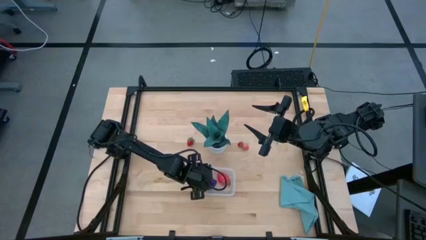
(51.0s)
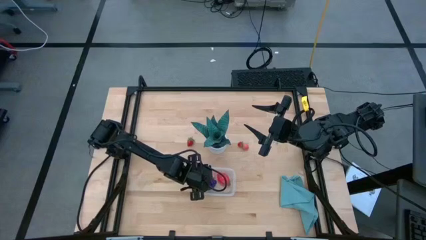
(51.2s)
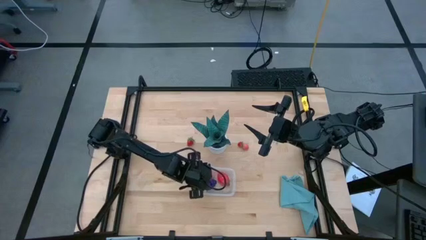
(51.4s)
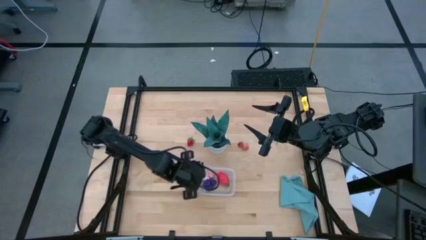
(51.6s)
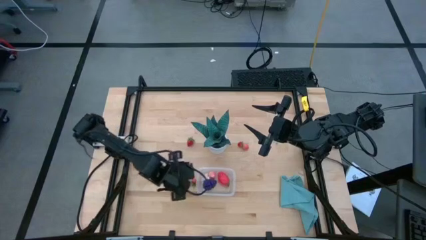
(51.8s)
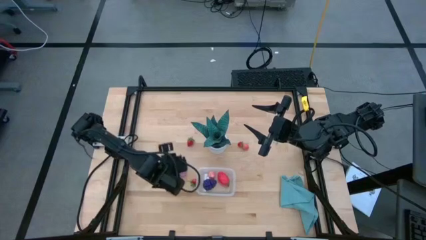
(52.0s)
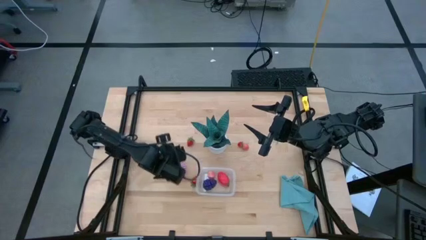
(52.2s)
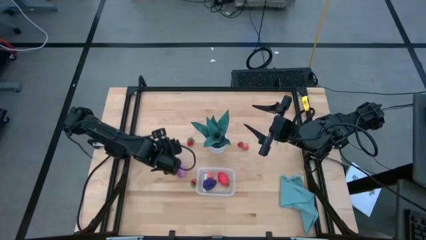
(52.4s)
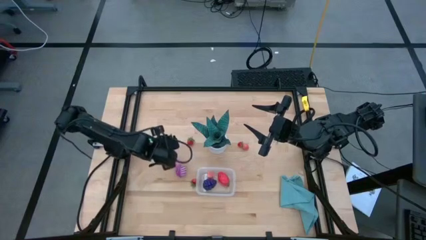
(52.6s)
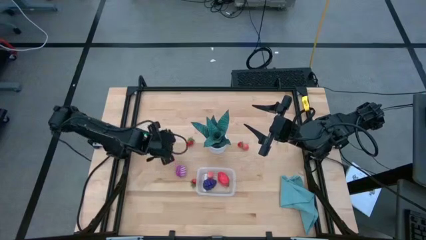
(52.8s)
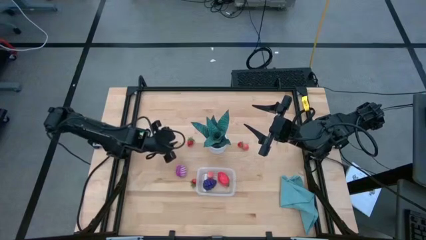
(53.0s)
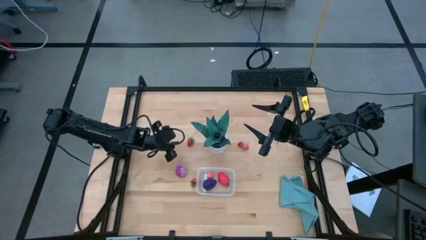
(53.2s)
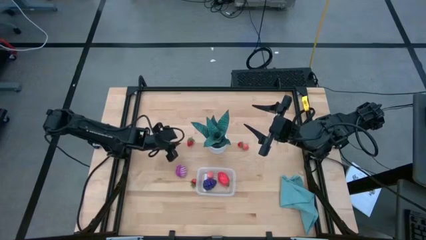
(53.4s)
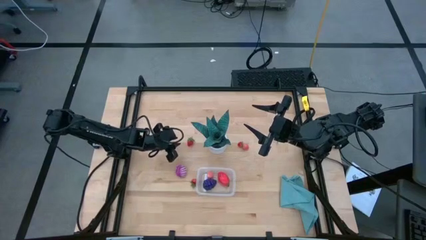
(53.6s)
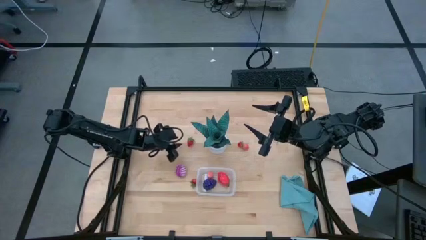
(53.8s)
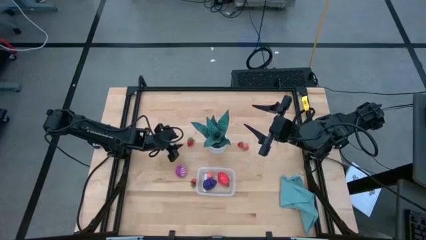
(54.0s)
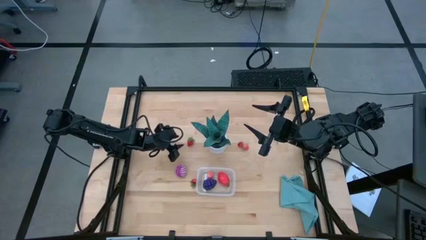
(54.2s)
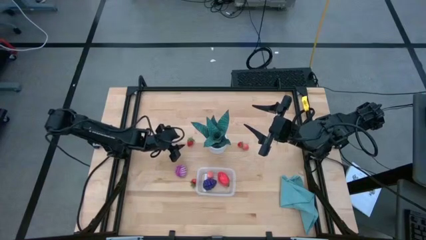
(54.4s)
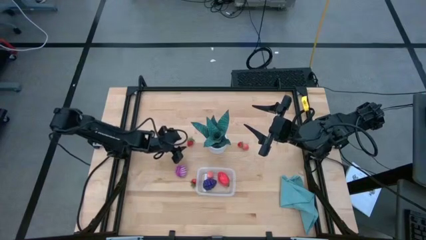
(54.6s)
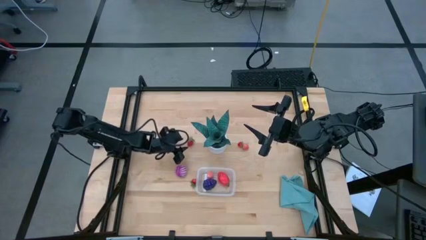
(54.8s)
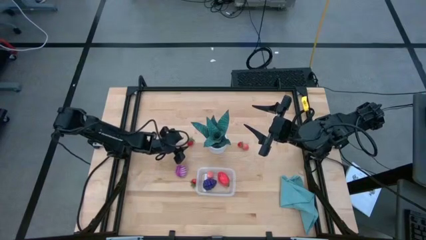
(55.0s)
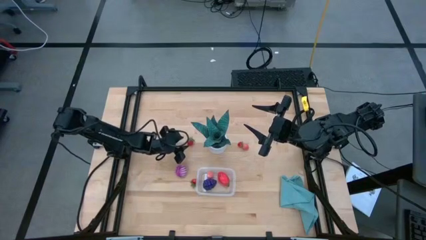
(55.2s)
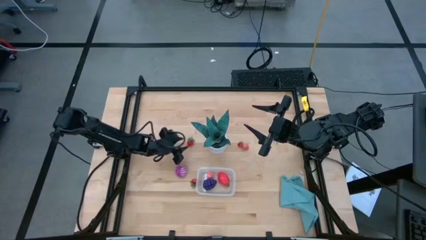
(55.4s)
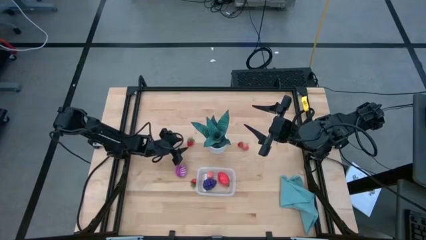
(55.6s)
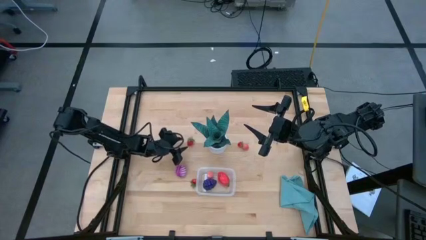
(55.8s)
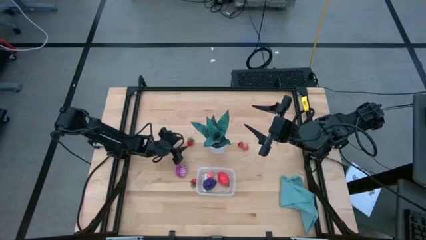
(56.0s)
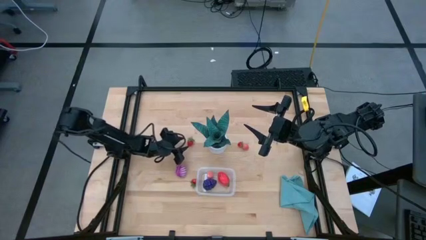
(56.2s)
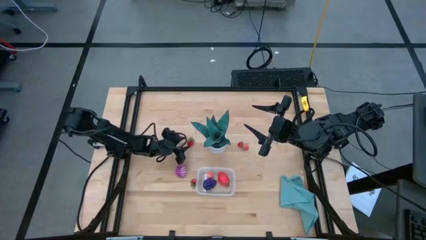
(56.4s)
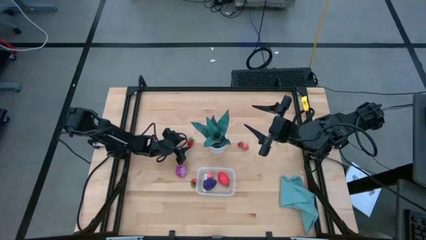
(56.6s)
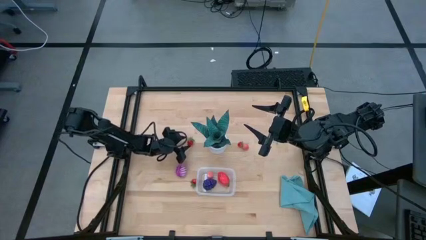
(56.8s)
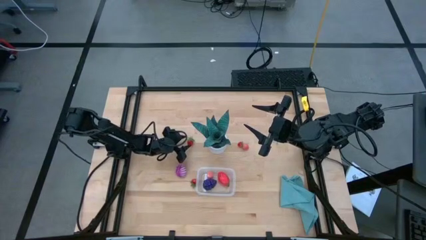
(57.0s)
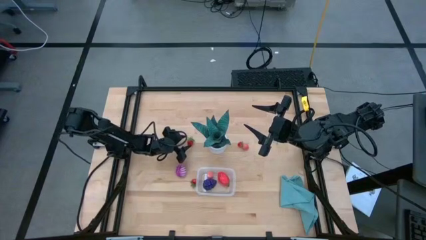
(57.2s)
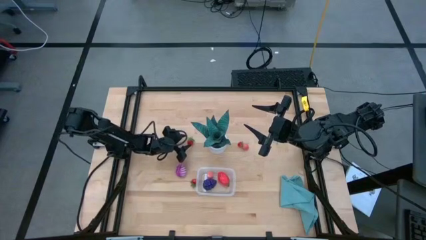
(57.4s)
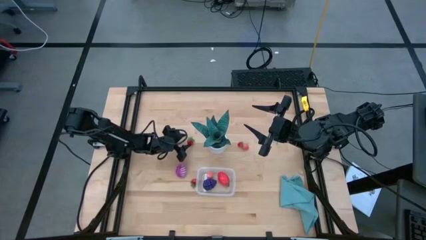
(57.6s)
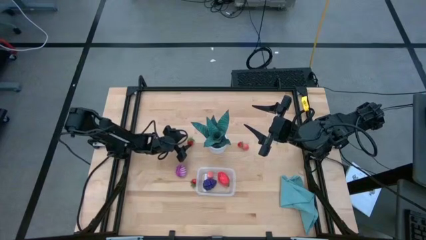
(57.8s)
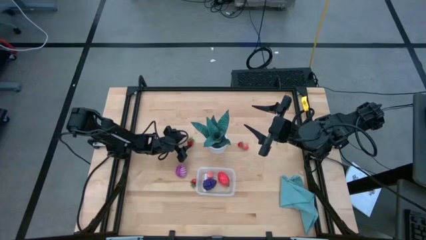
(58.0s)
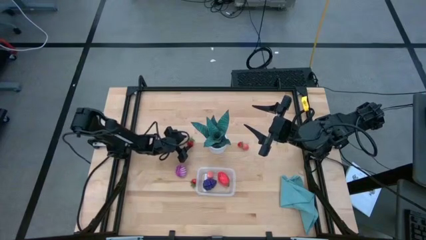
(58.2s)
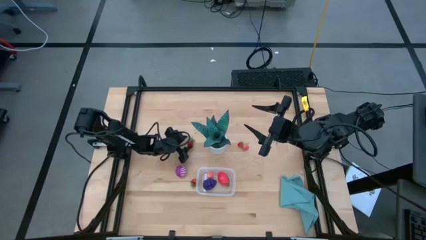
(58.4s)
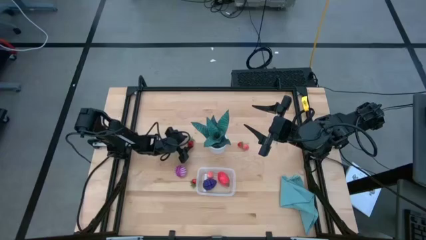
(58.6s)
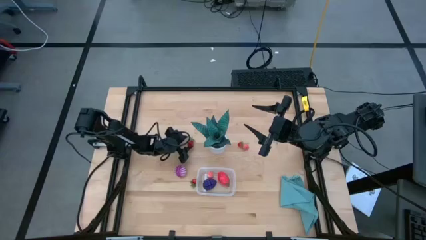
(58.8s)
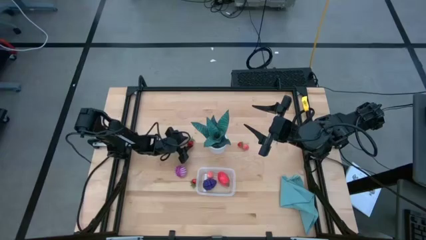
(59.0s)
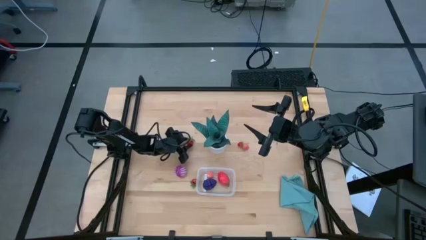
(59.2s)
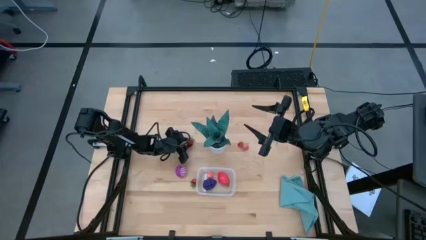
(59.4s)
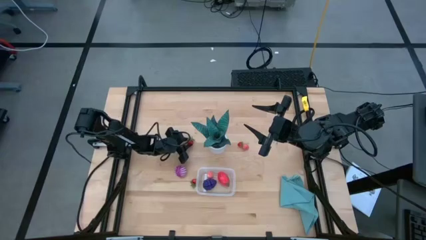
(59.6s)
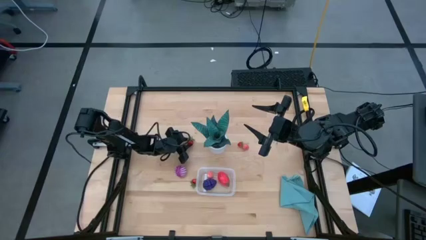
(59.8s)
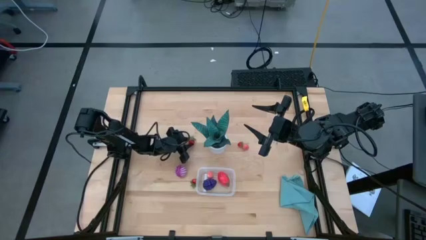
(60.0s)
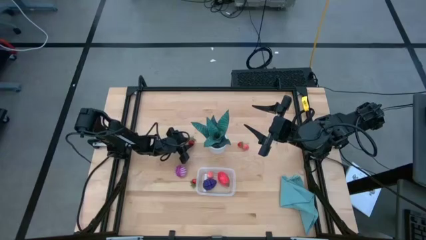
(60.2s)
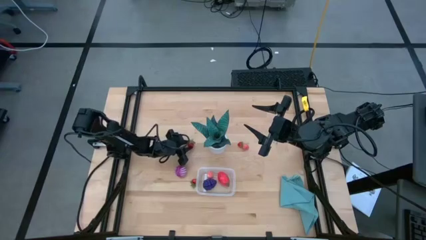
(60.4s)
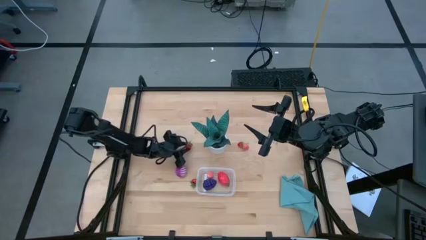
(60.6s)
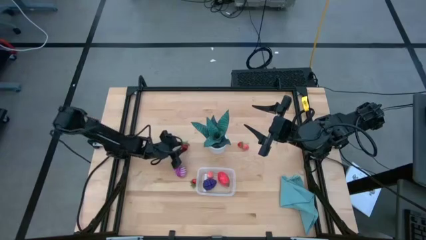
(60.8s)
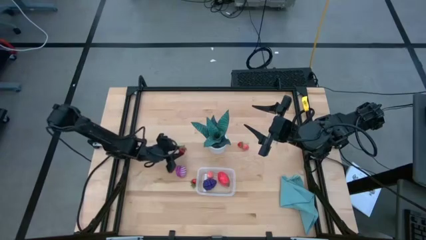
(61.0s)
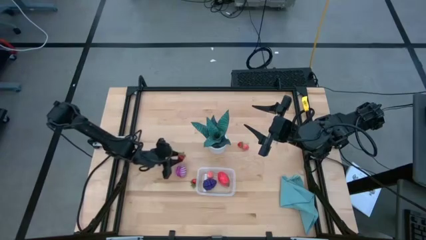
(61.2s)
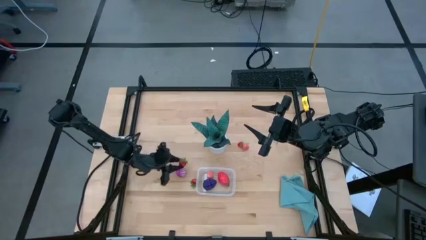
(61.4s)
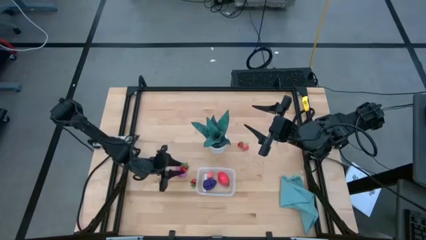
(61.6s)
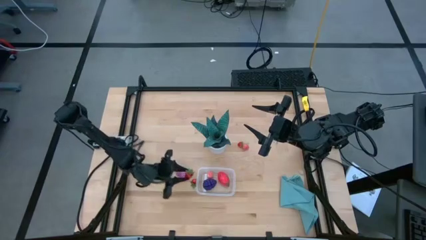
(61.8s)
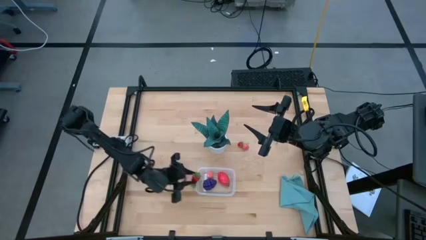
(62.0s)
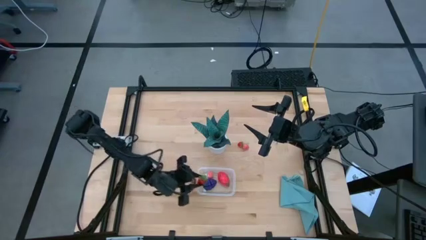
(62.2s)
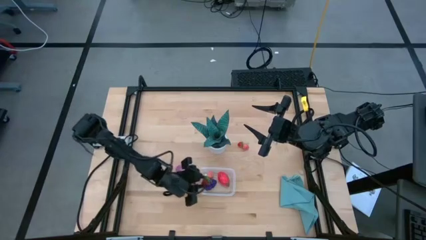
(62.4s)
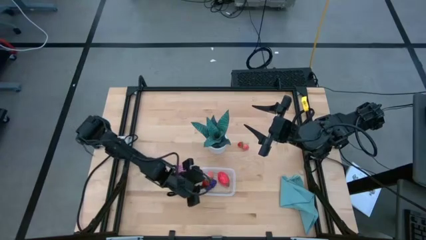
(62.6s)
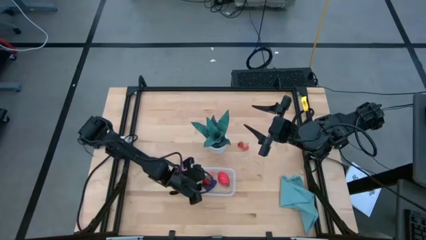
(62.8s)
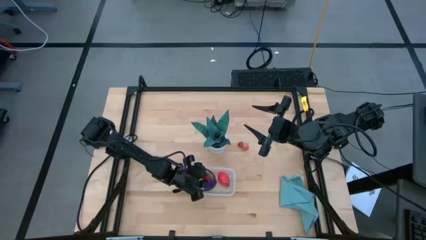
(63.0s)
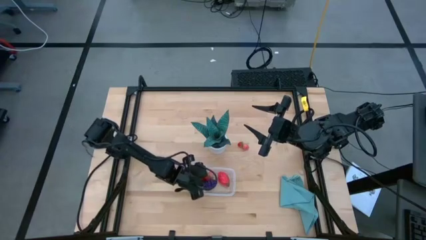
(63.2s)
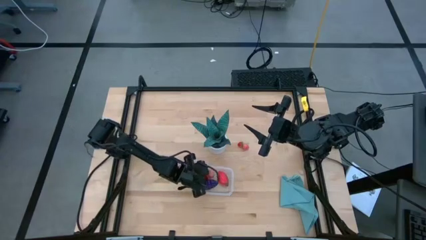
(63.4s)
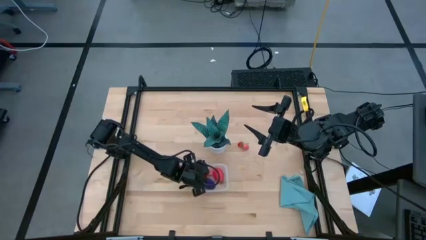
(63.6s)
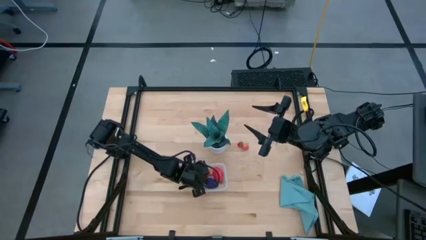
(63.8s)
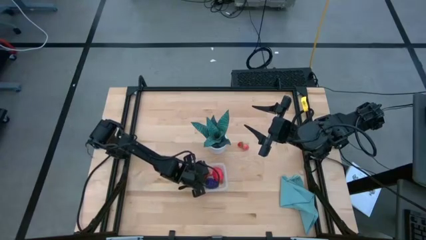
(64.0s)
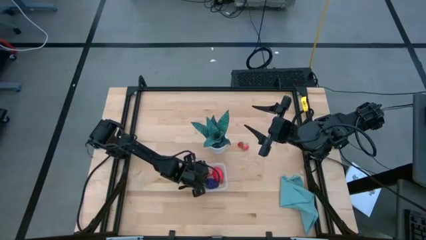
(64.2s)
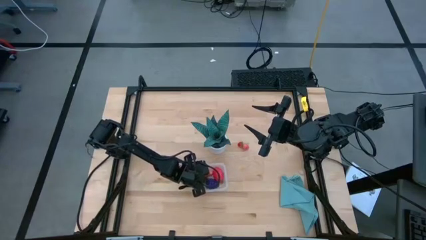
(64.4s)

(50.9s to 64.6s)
Task: Pick and placing Produce into tupperware
Put the top left red strawberry into the transparent bin

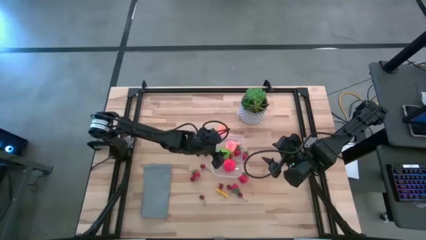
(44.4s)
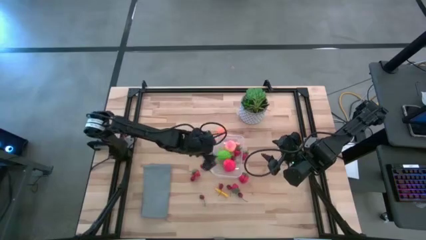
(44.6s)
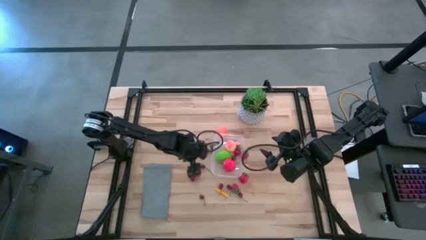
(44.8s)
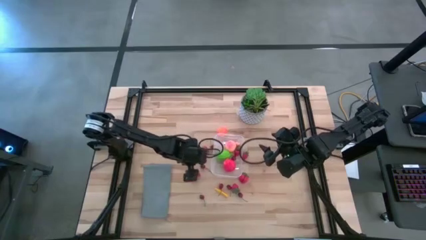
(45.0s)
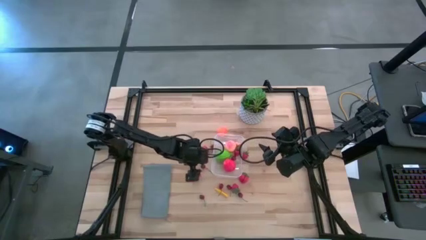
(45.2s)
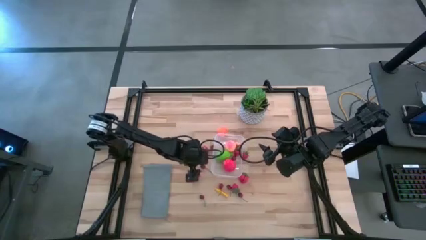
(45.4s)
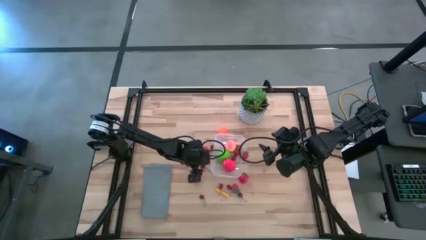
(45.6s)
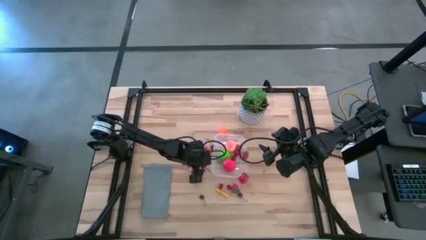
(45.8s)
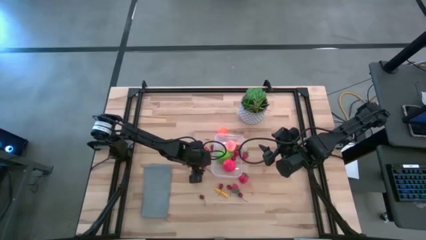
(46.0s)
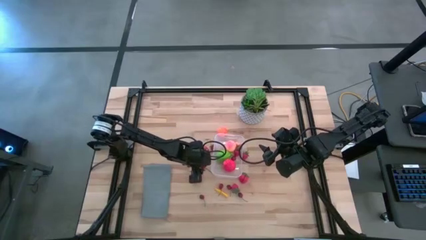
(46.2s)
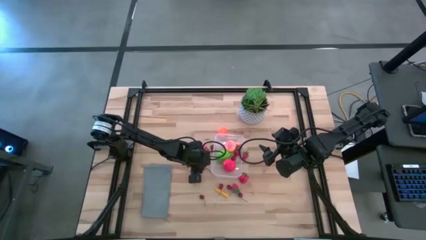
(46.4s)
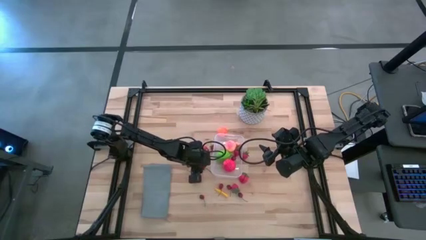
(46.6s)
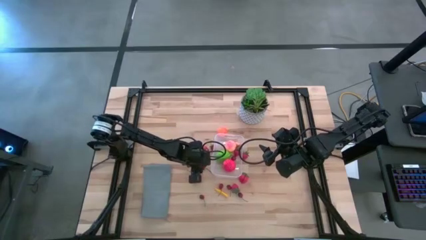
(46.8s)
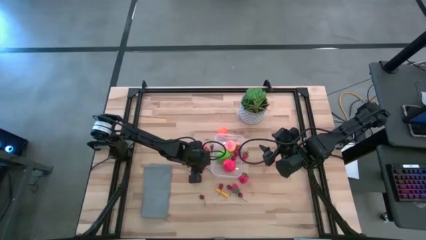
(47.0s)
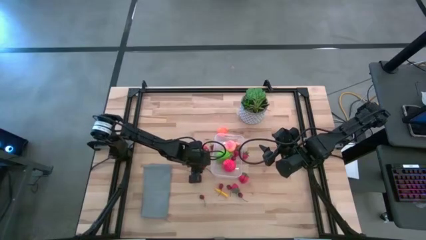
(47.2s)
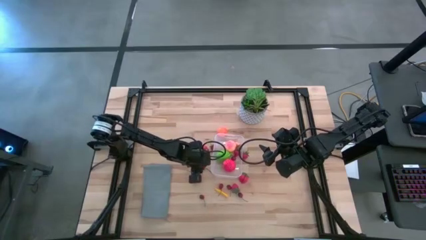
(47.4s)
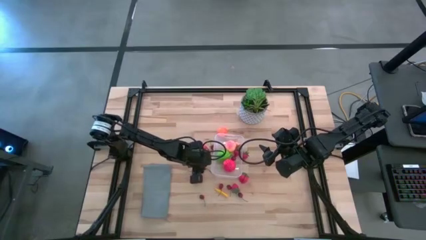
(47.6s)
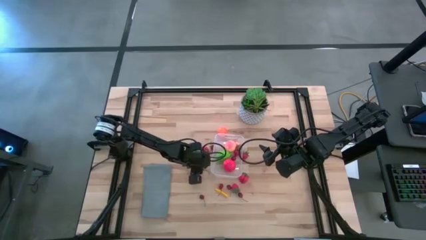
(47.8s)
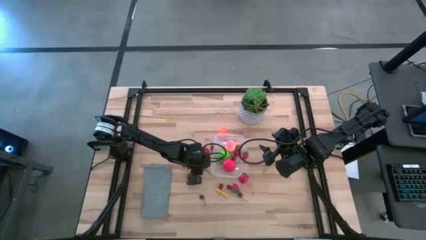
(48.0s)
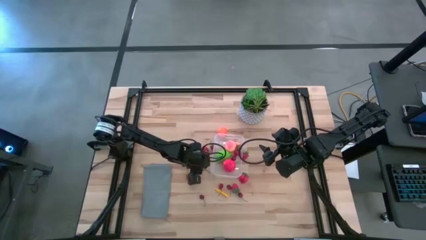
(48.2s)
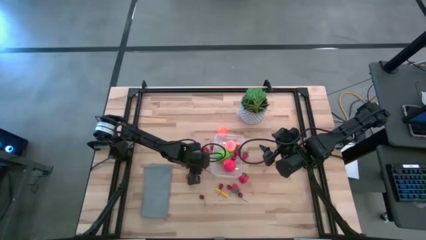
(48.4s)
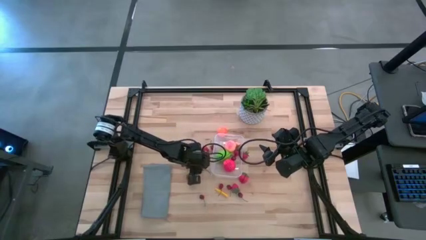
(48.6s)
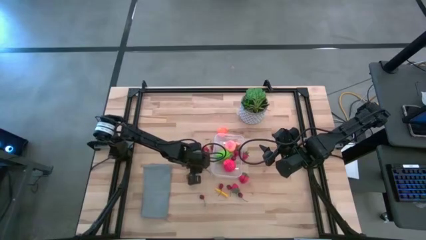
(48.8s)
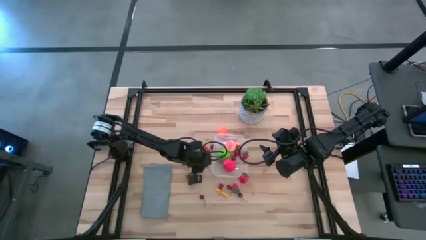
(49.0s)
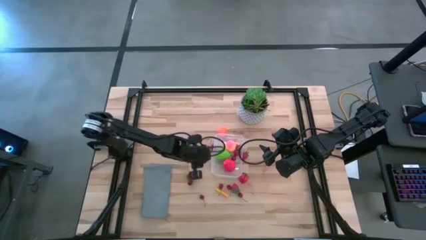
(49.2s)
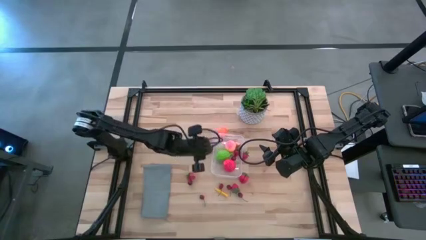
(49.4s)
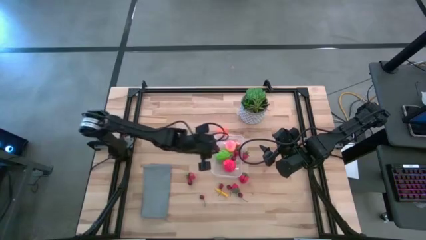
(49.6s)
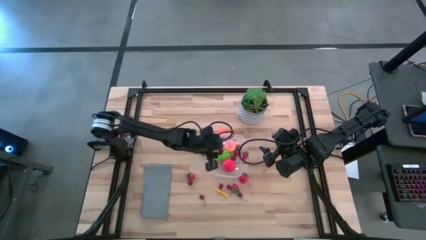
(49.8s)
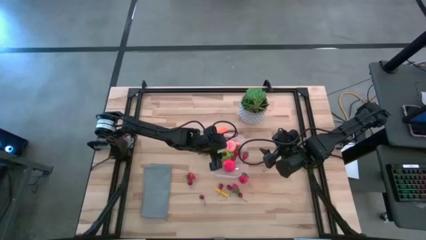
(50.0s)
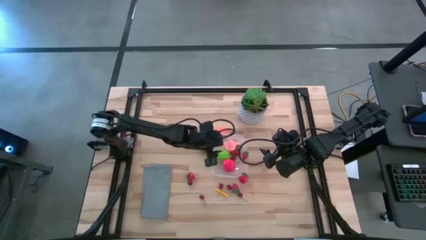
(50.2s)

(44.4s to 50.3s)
Task: Pick and placing Produce into tupperware
Put the red cherry into the transparent bin
